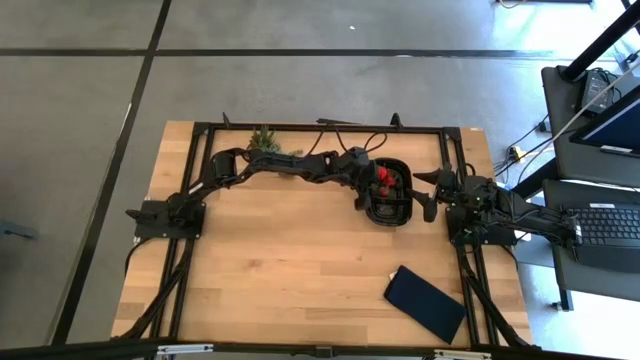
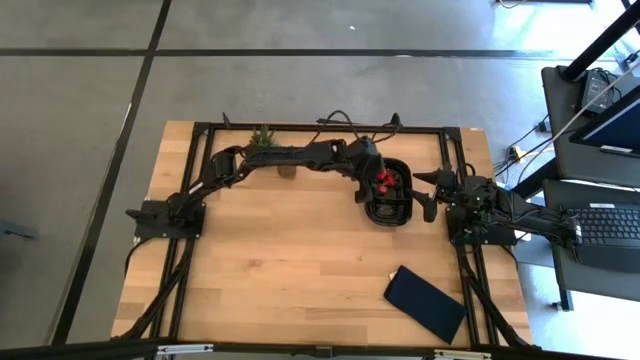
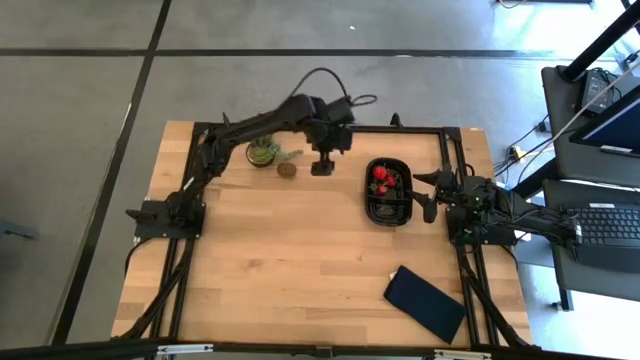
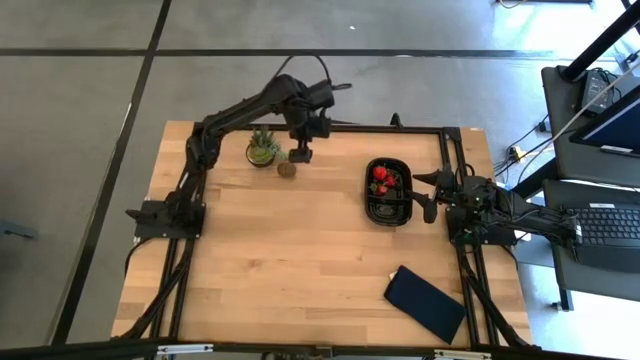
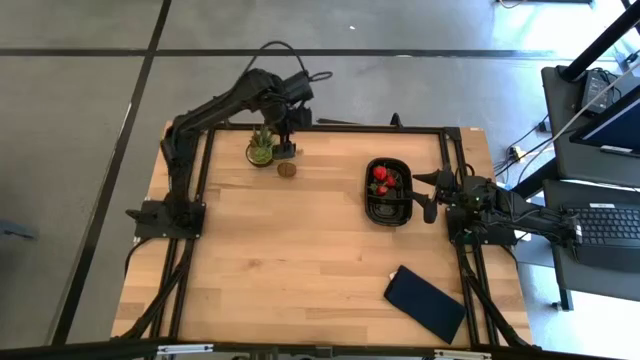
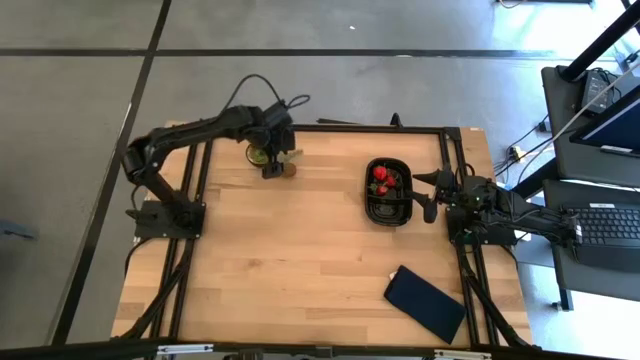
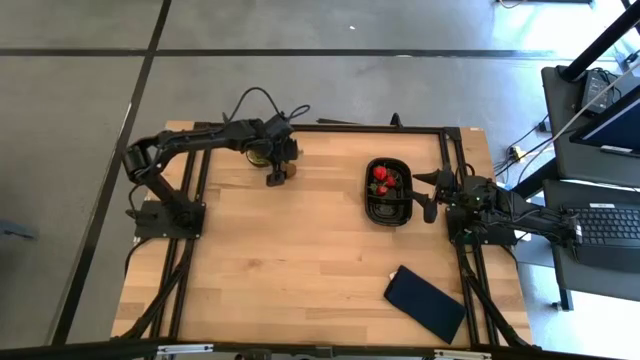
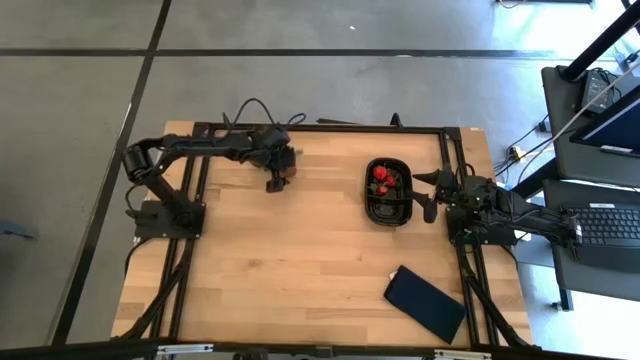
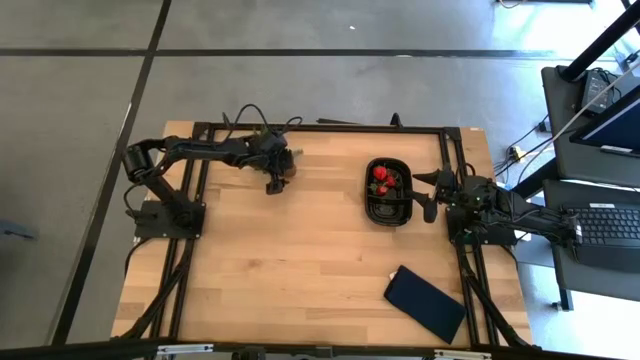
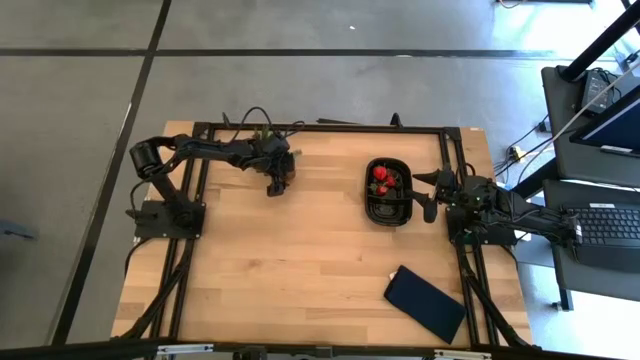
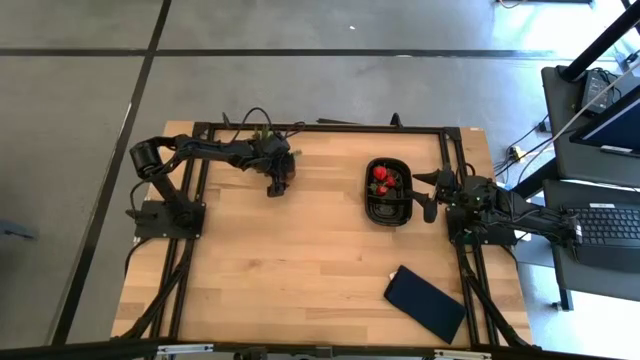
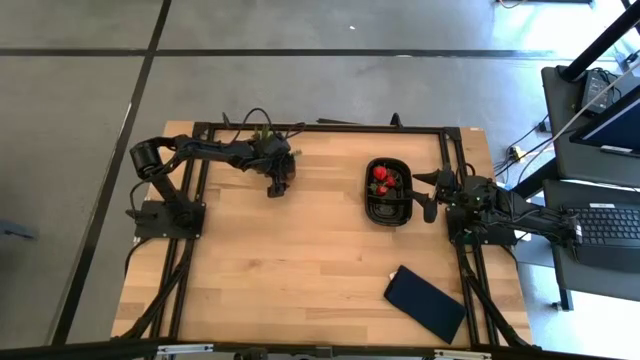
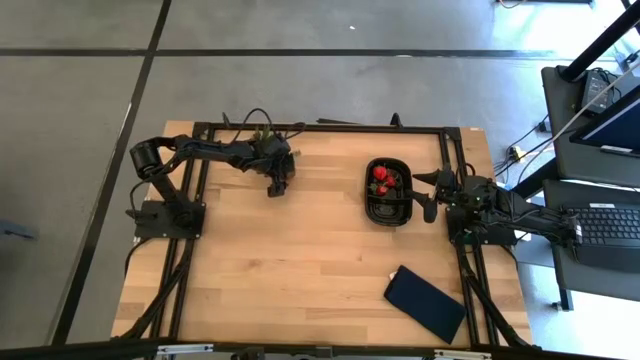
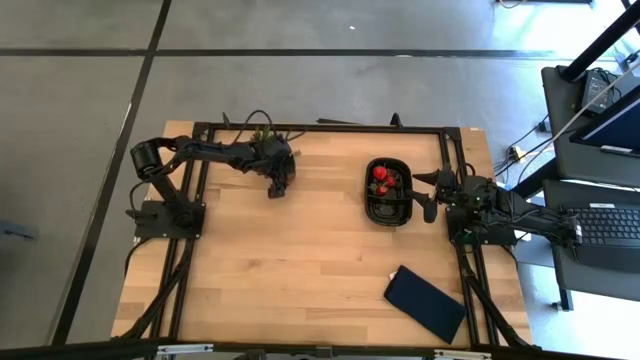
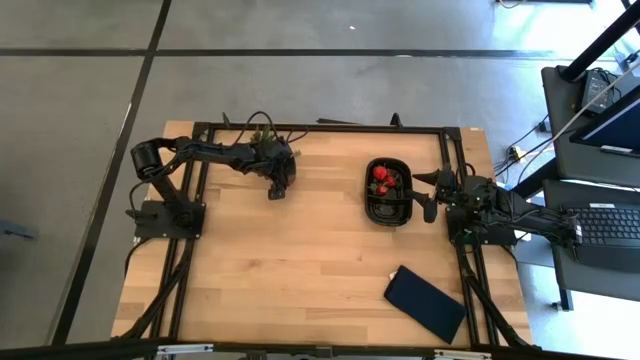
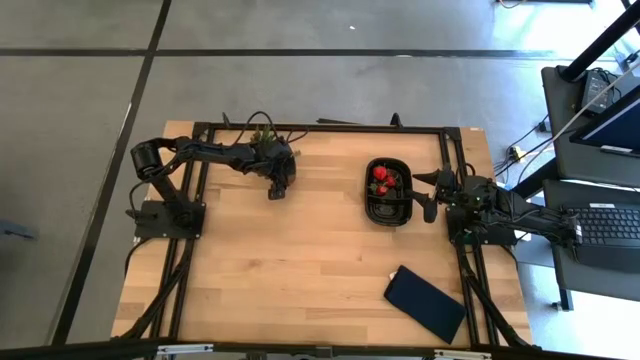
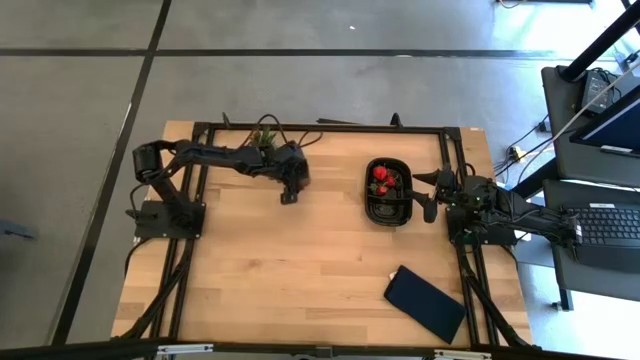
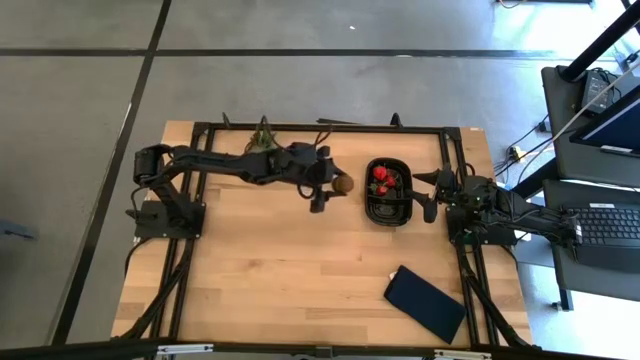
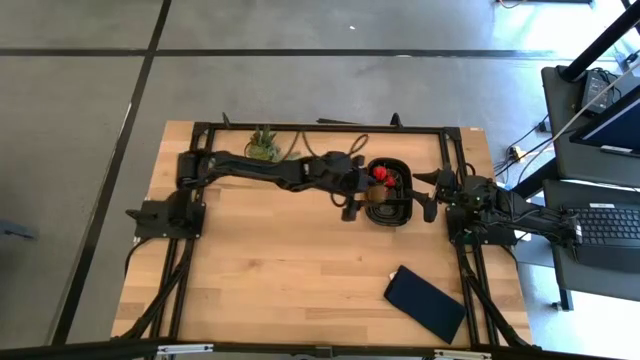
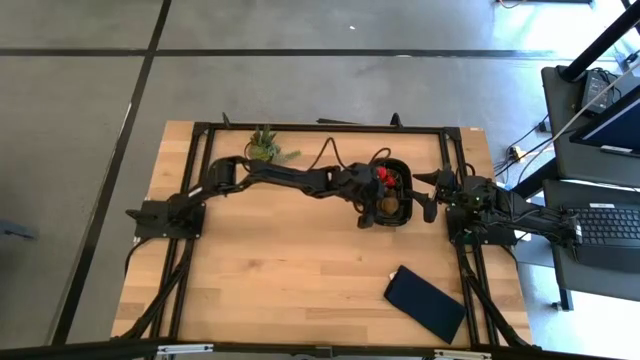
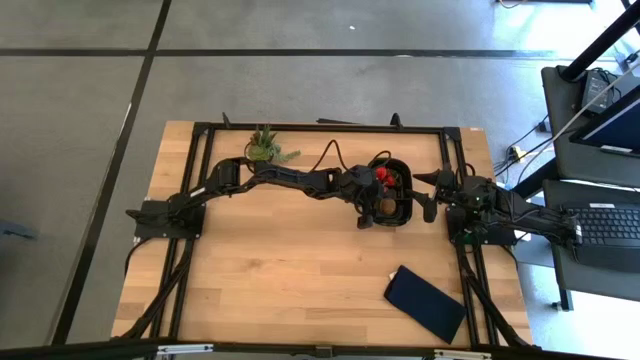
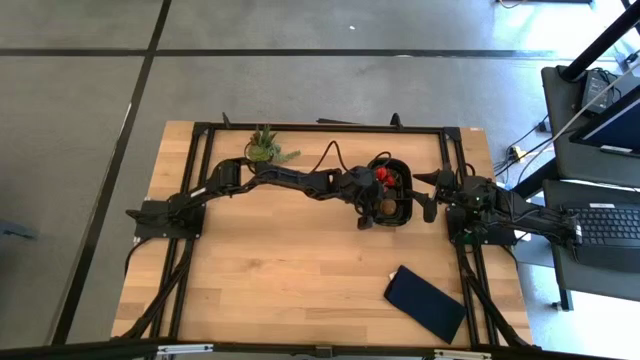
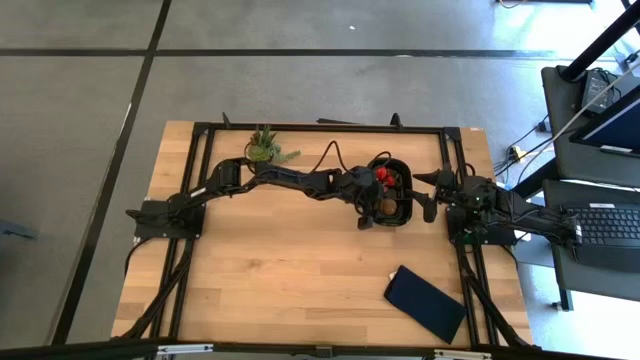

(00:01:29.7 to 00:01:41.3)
Task: Pick and placing Produce into tupperware
Put the brown kiwi into the black bin

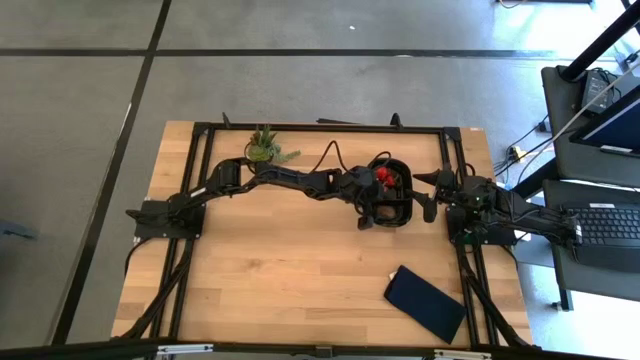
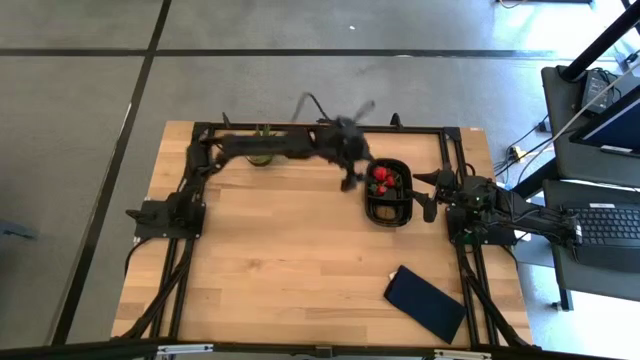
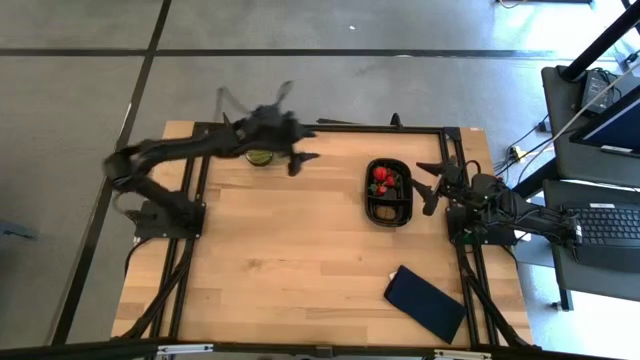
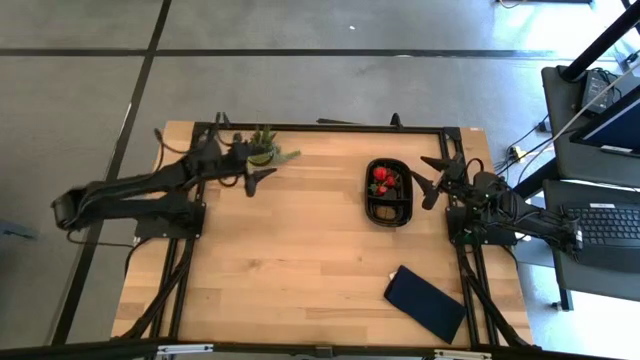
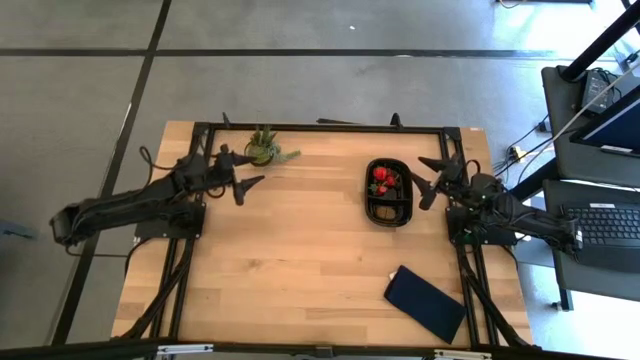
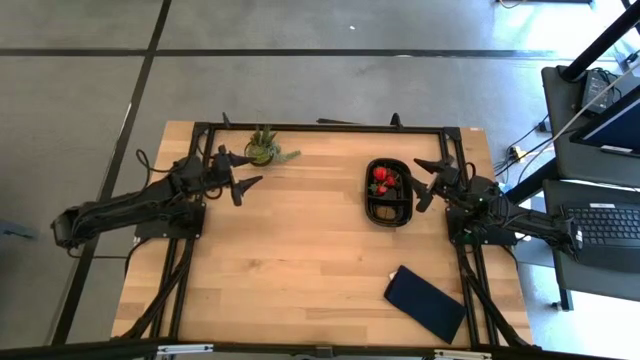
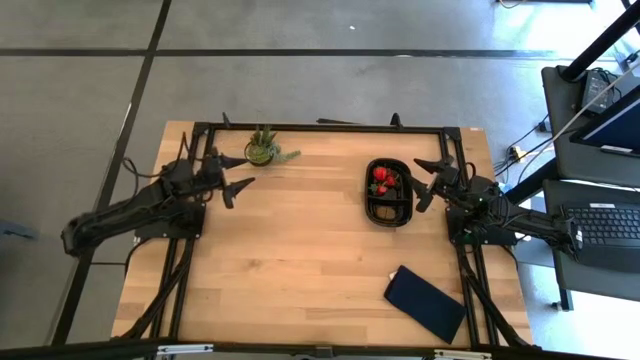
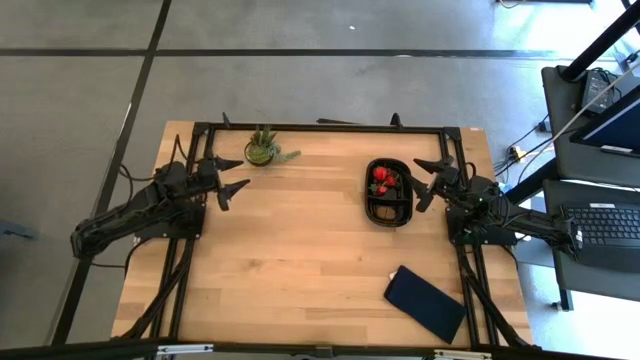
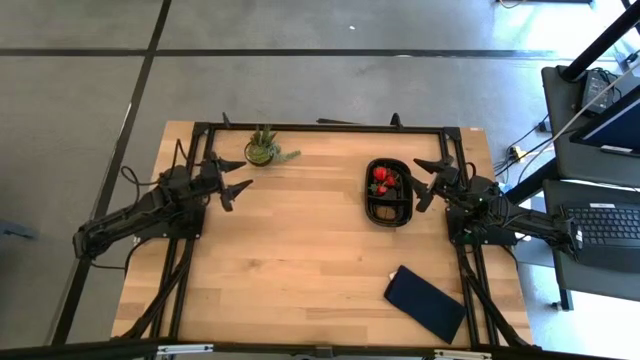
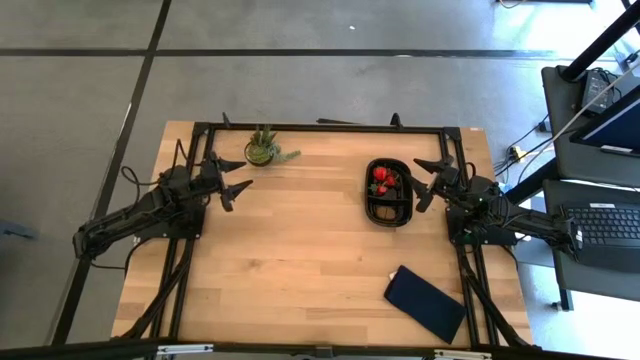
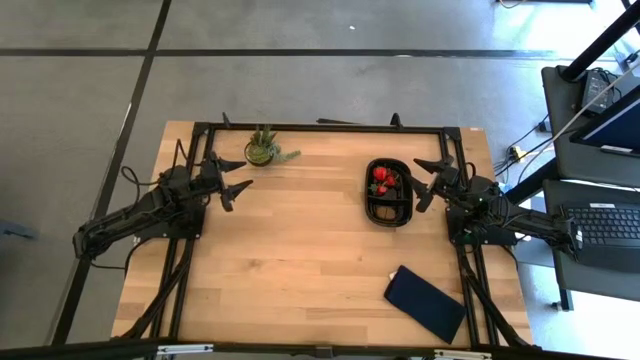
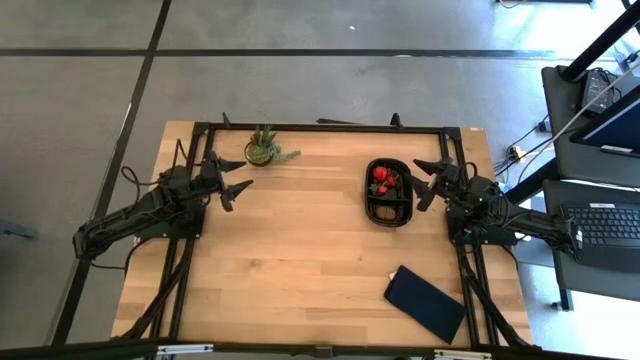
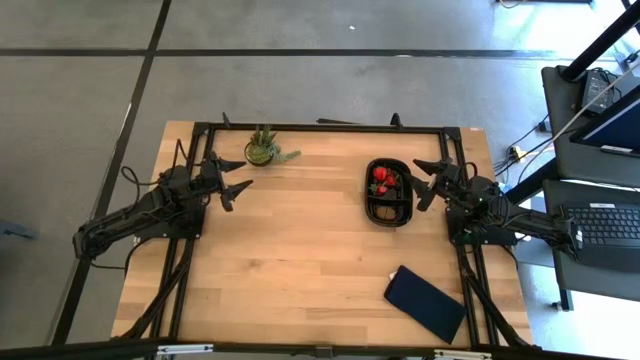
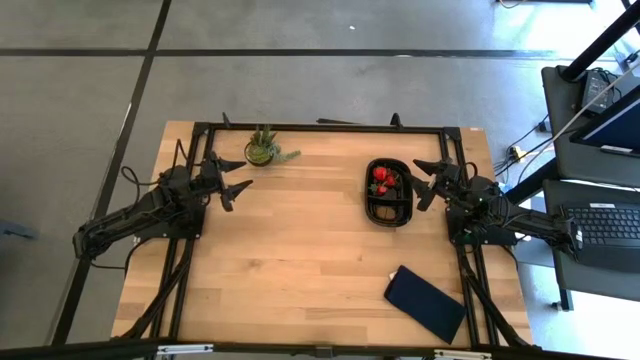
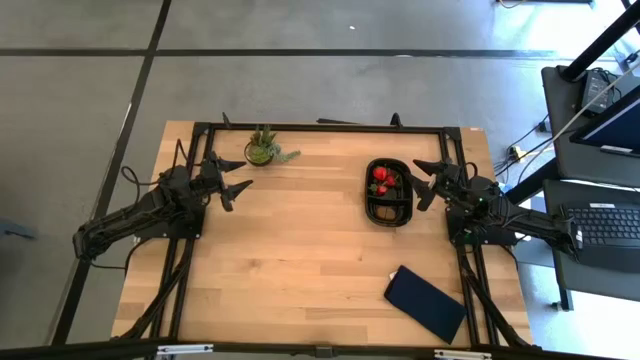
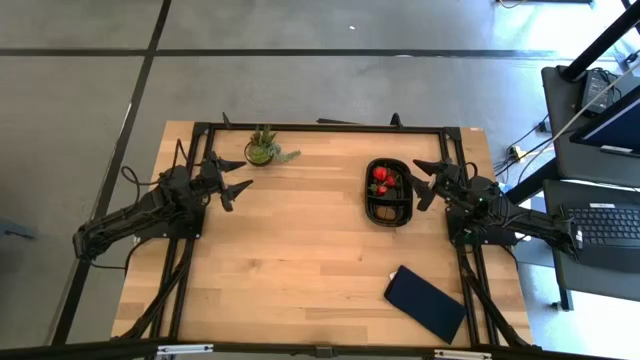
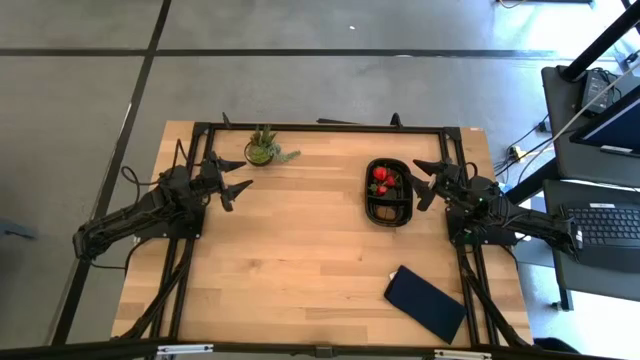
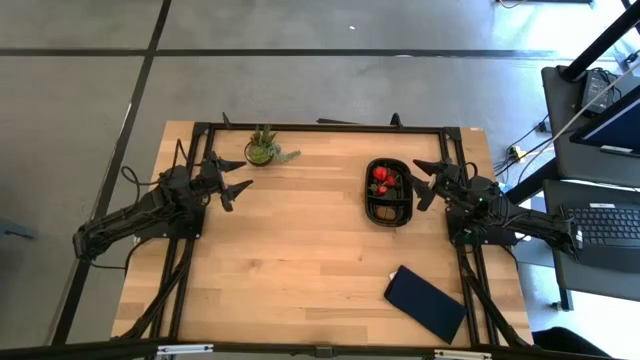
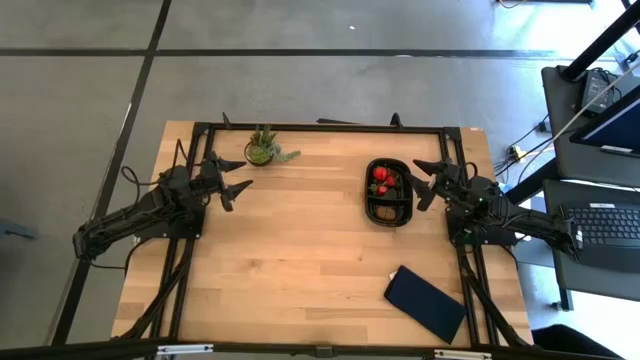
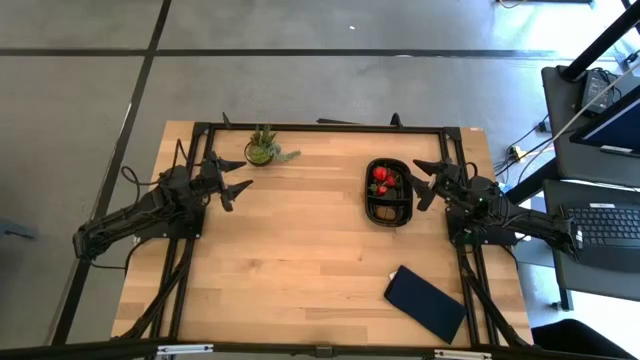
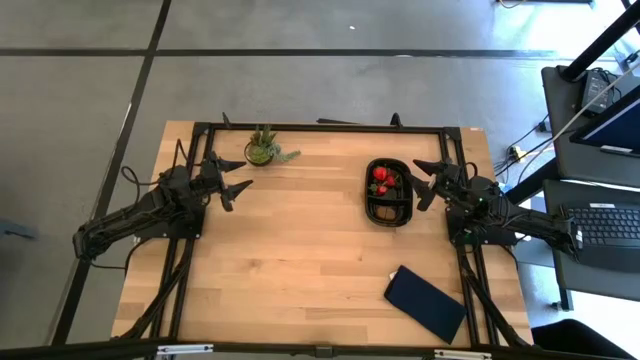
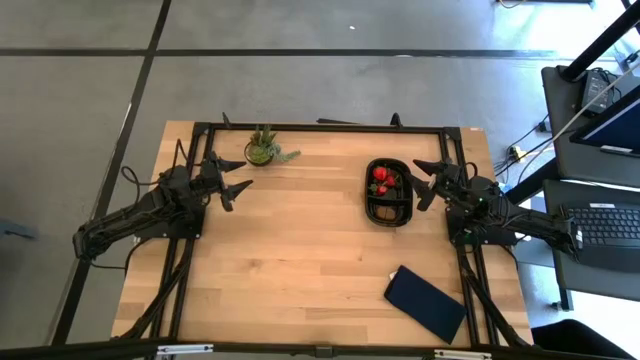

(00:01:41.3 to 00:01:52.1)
Return to Home Position

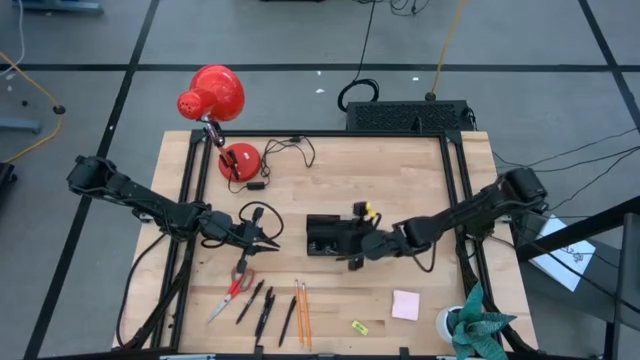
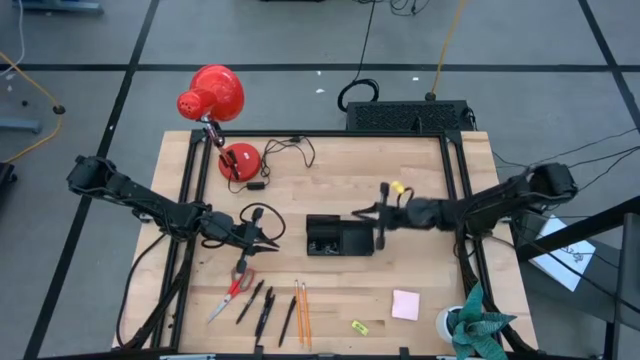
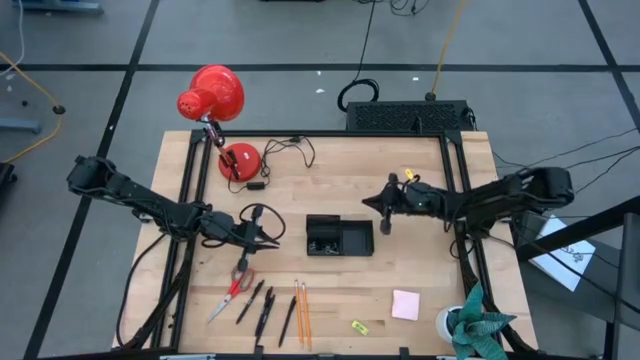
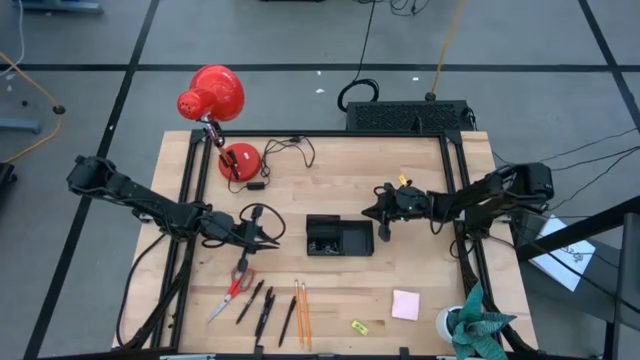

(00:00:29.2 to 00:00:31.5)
Task: Pick and place office supplies into organizer
Adjust the black desk organizer
